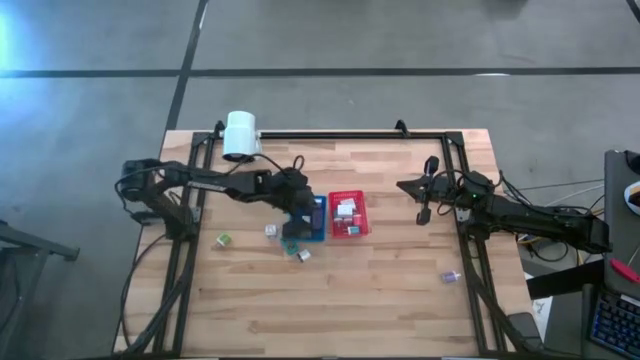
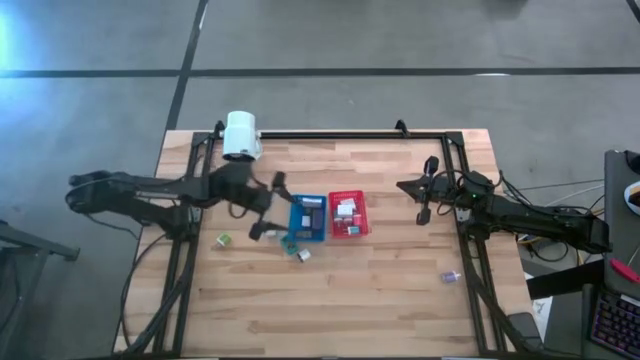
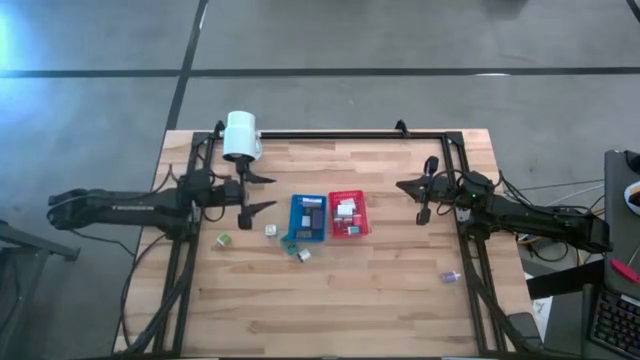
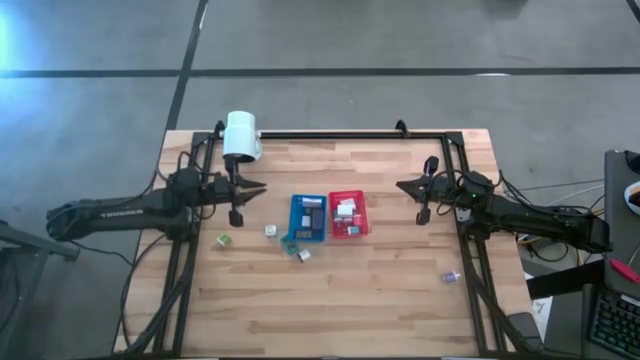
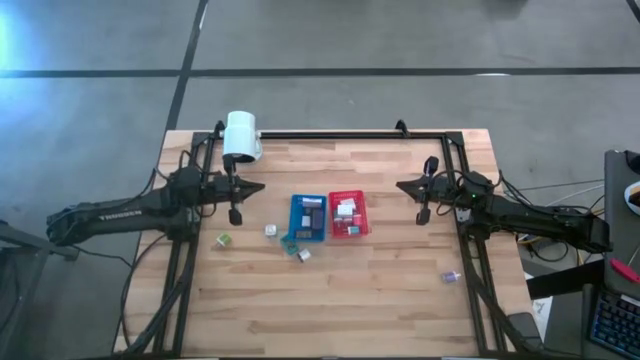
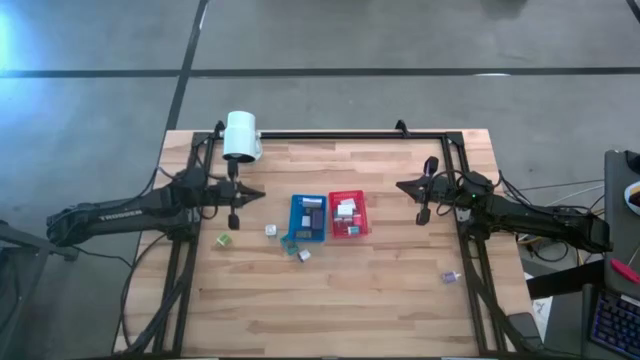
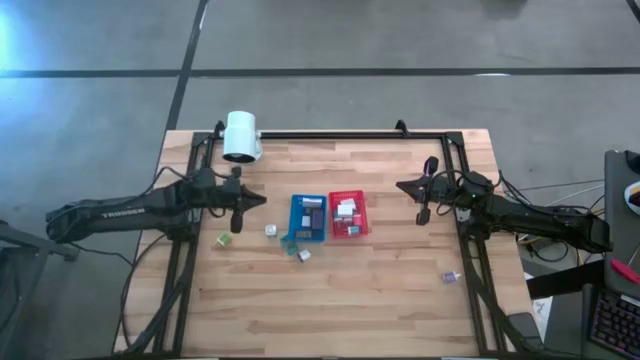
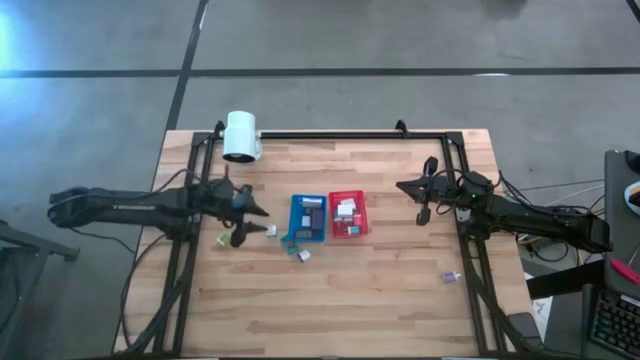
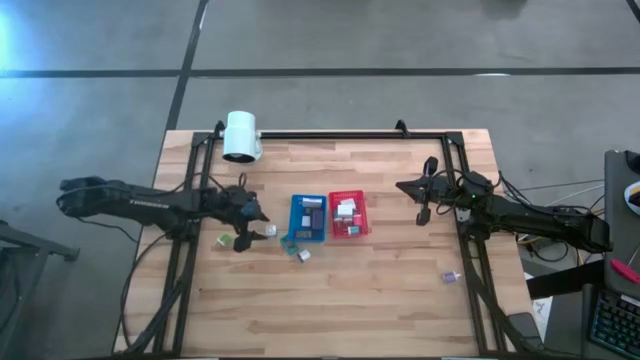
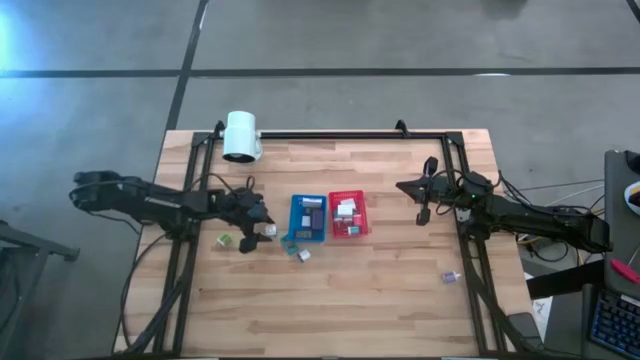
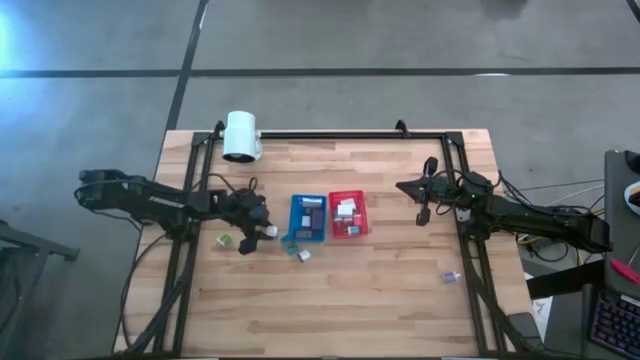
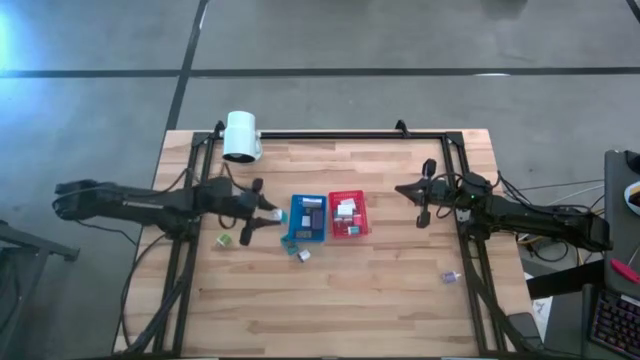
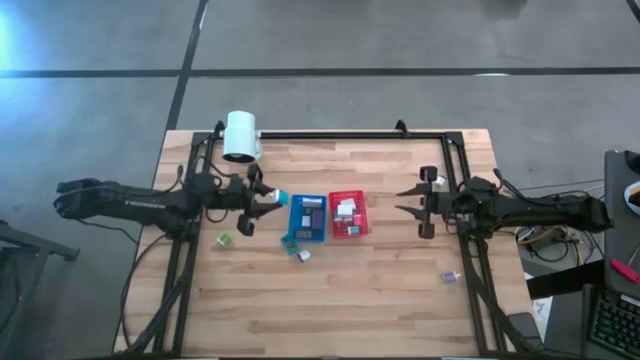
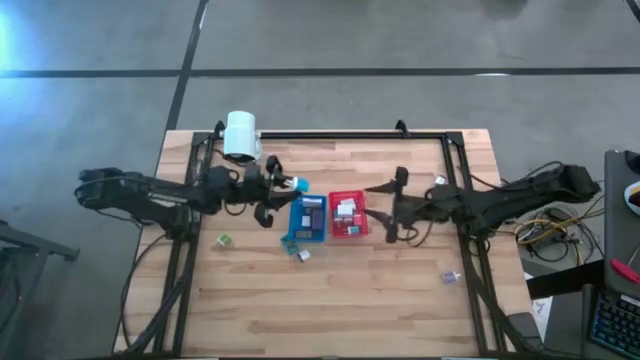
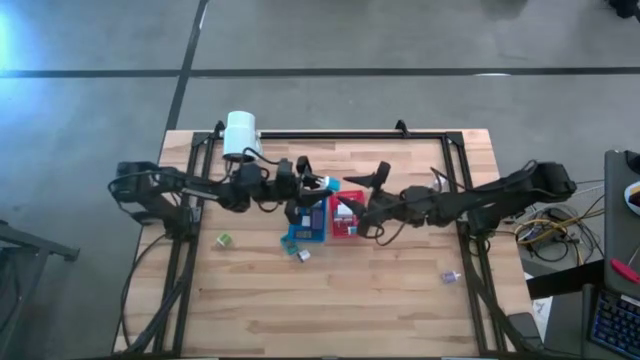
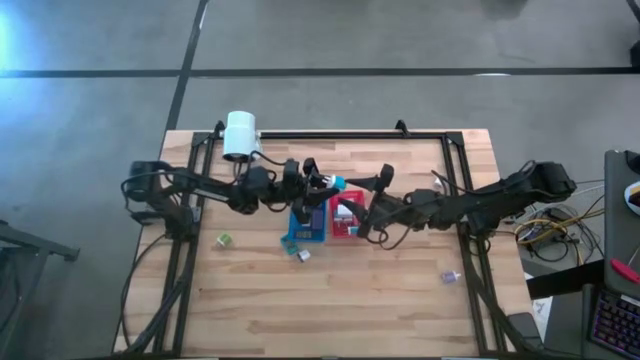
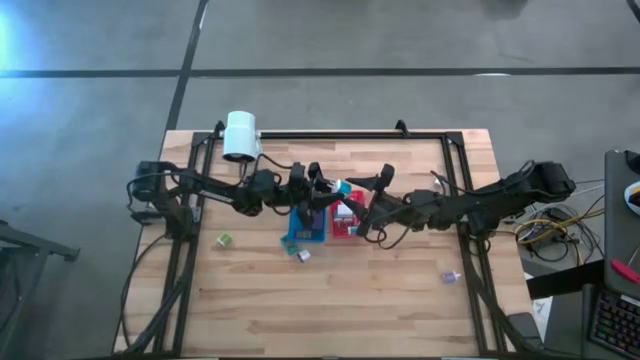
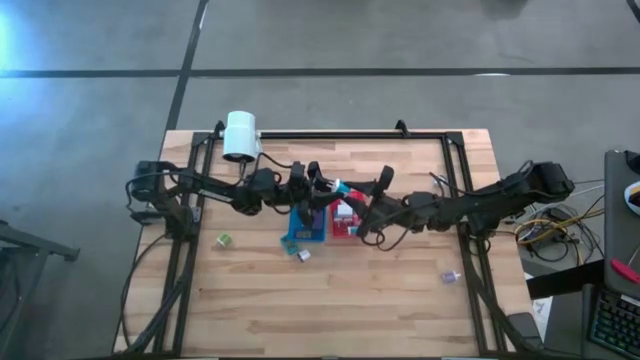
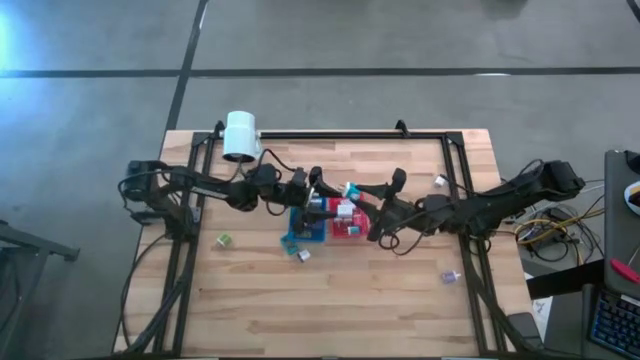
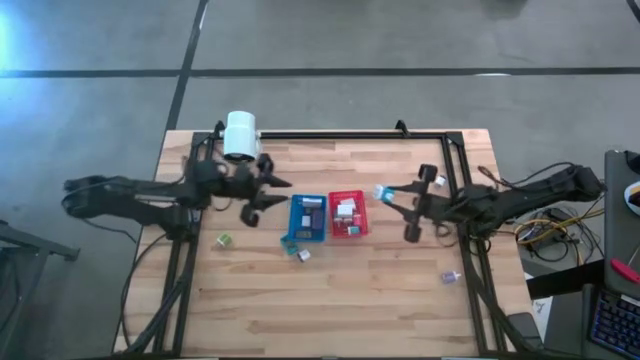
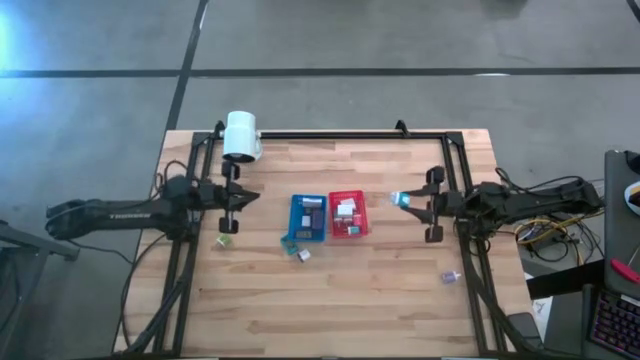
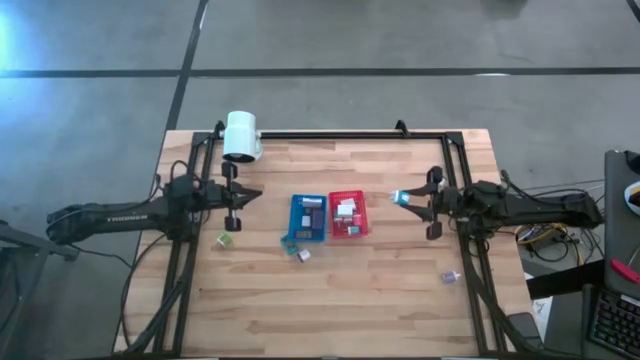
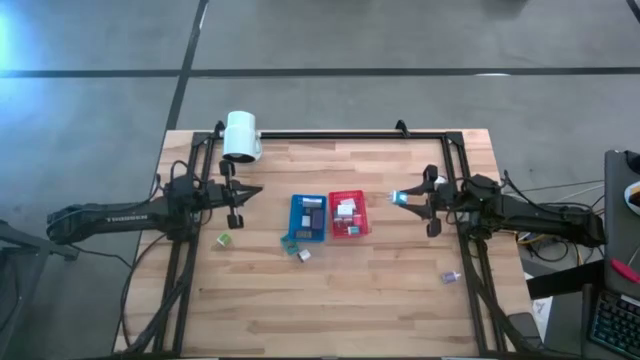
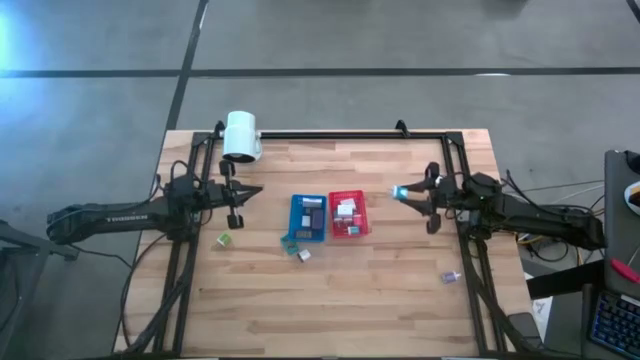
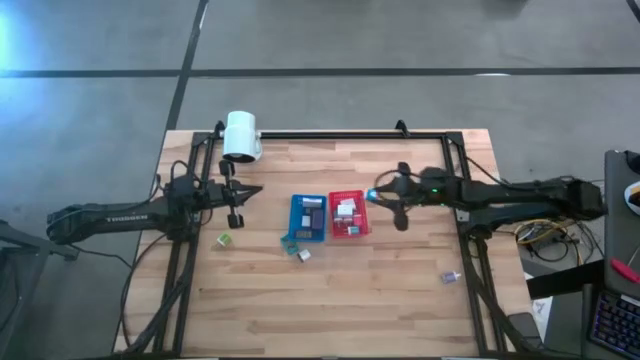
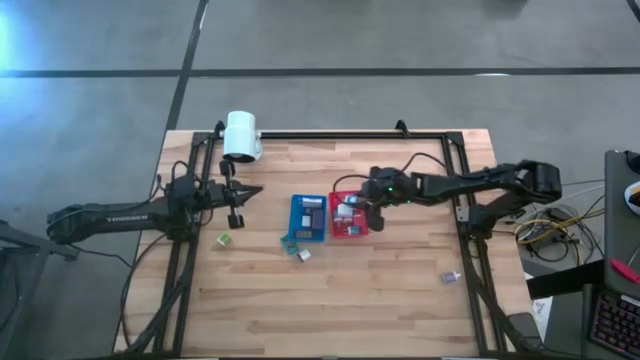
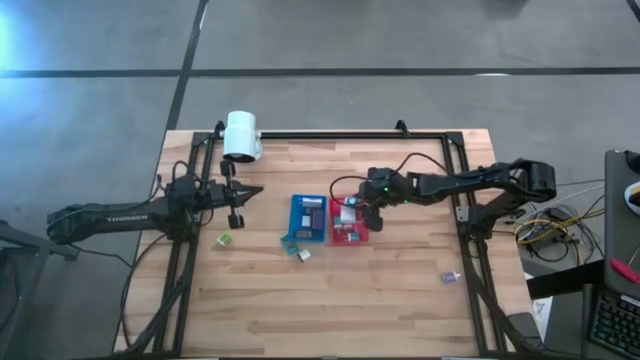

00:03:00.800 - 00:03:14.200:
Task: Pick & Place Office items
Put the light blue adaptor charger into the red bin

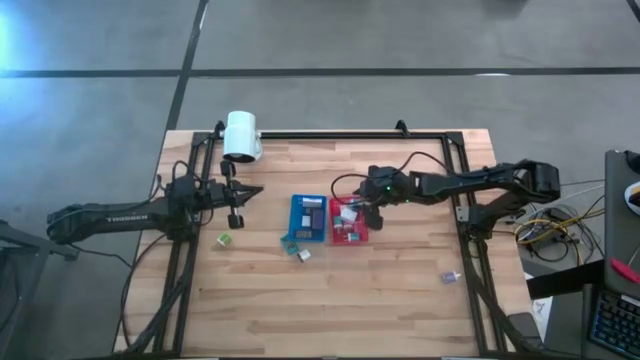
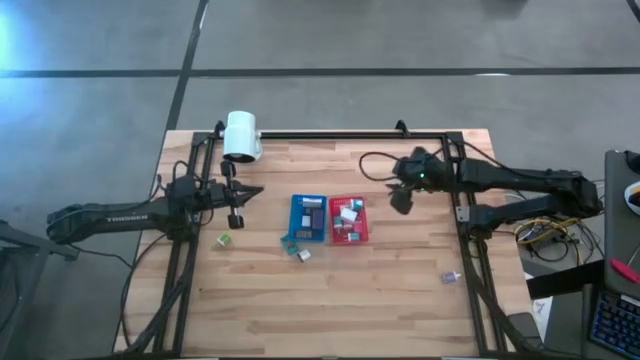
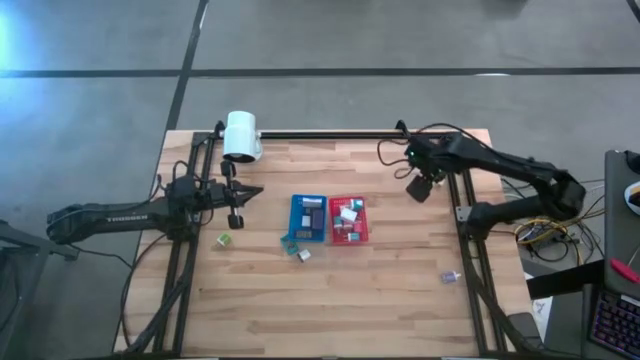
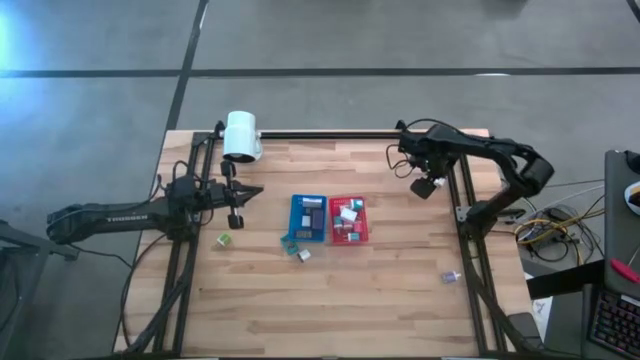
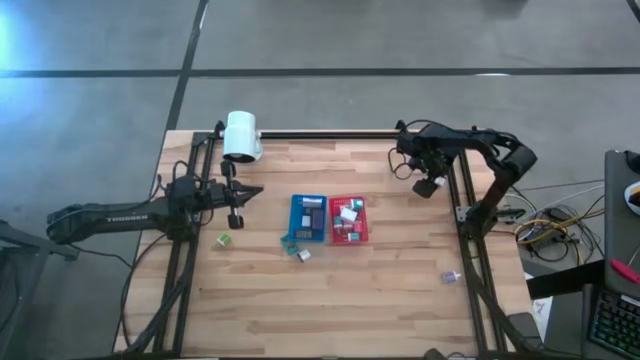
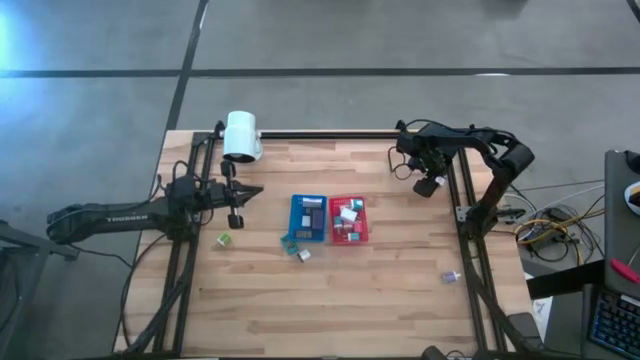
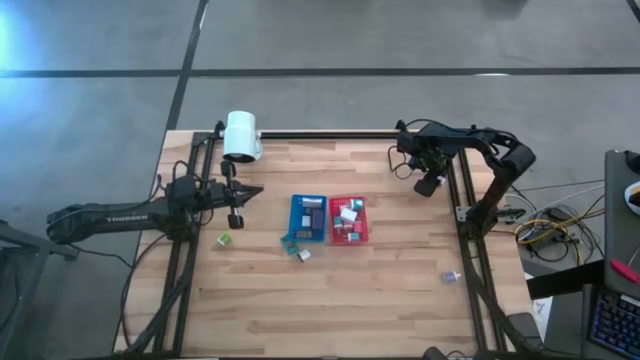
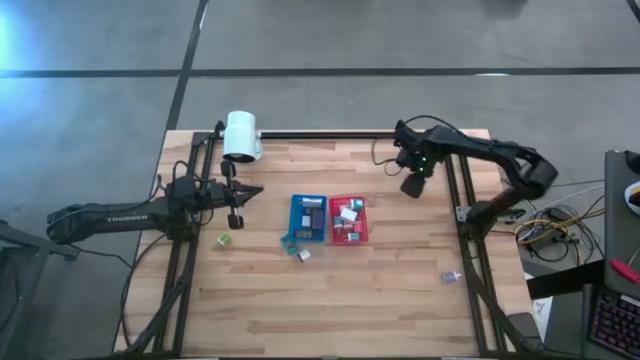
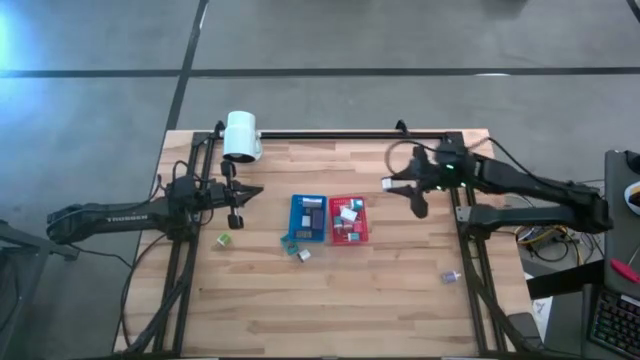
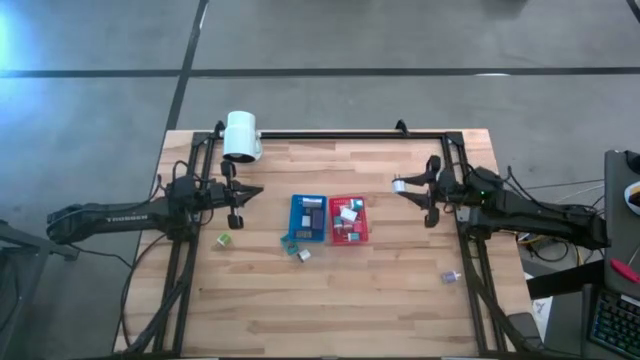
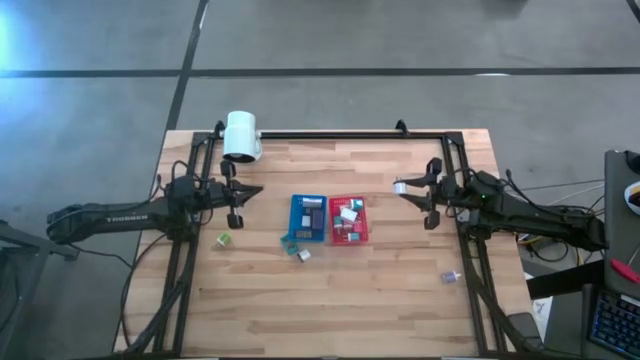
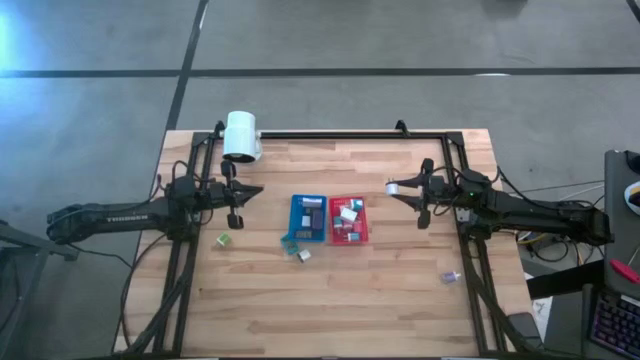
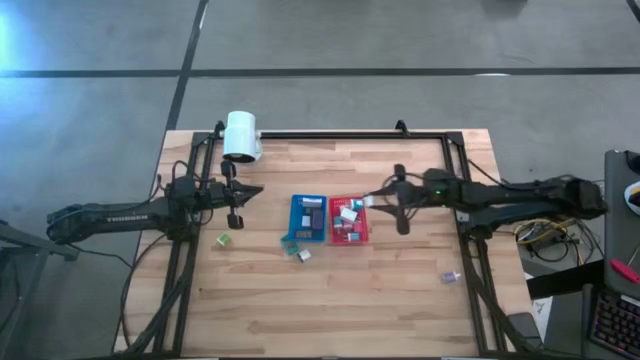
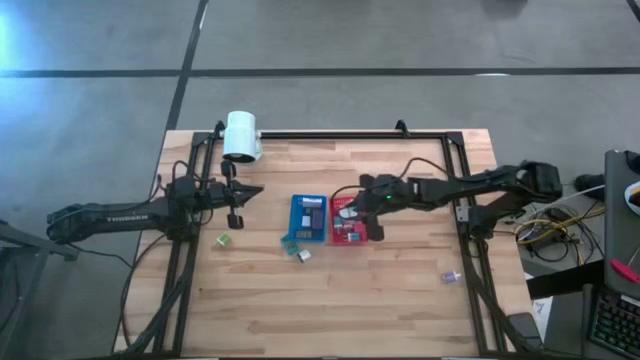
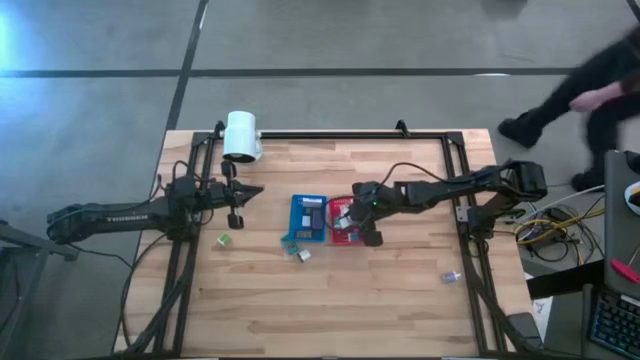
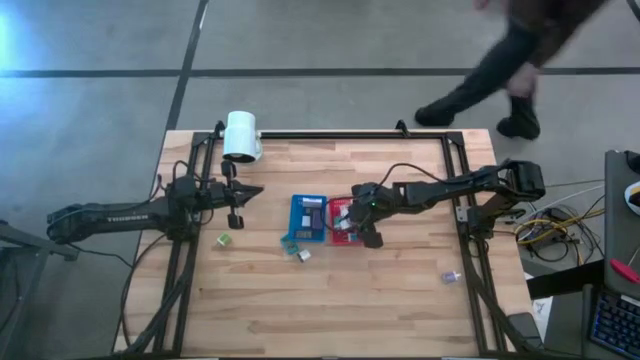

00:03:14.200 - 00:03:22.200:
Put the black white adaptor into the red bin
